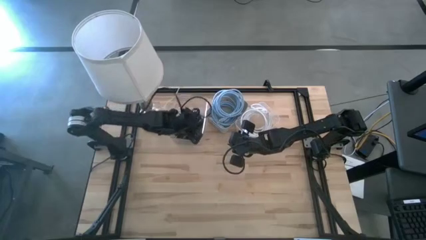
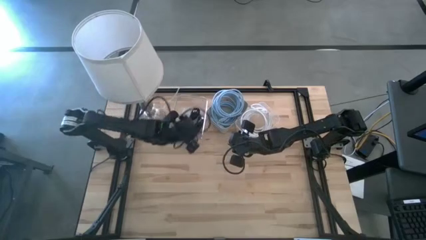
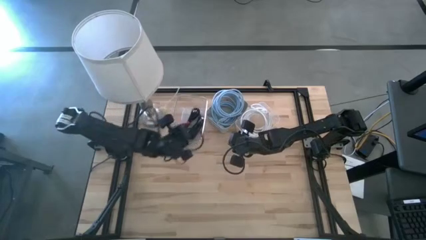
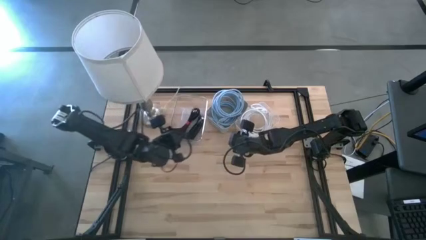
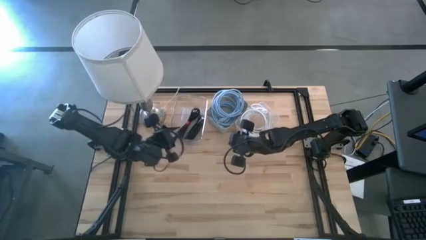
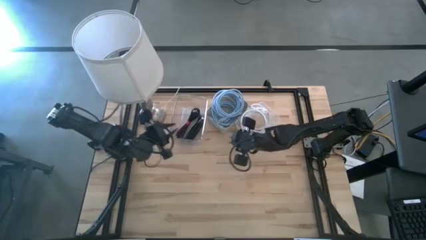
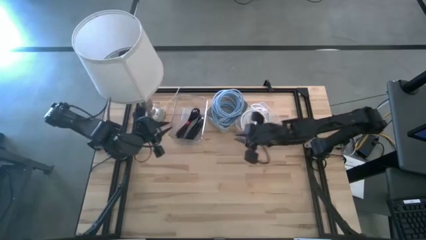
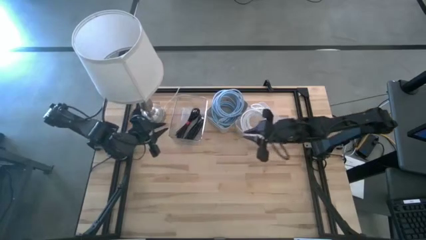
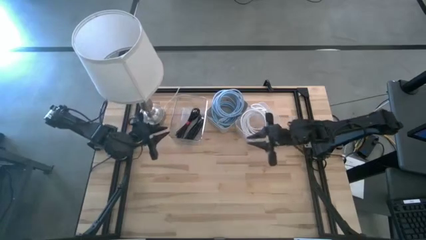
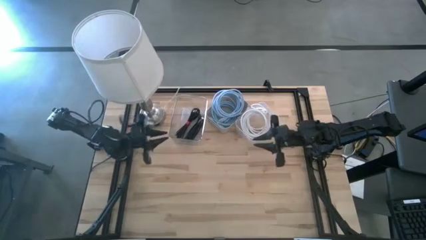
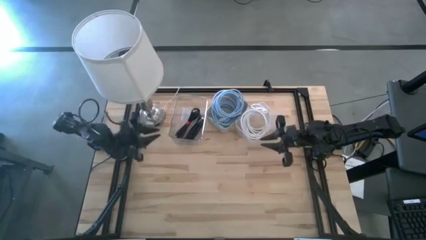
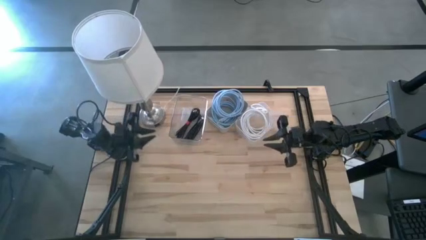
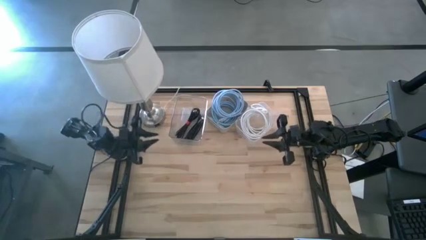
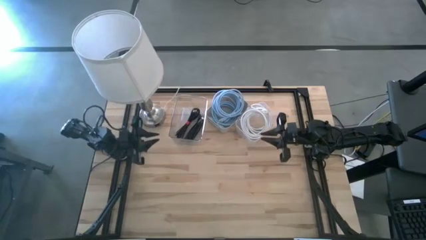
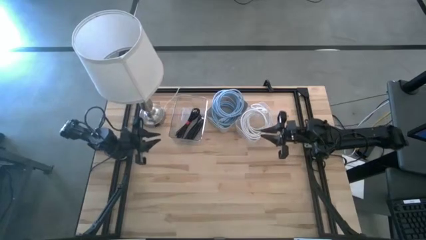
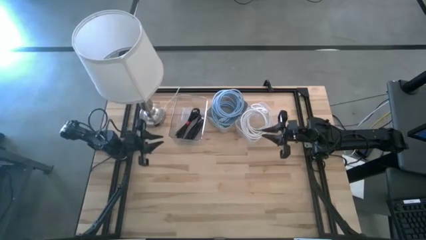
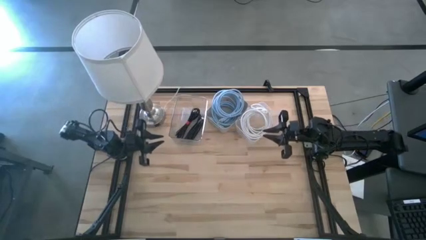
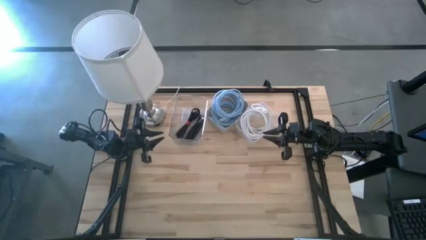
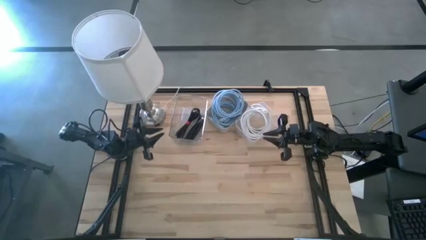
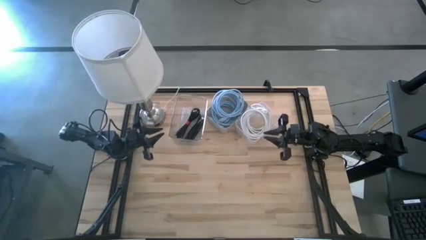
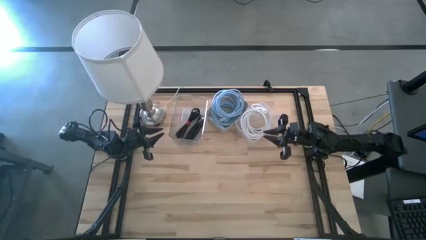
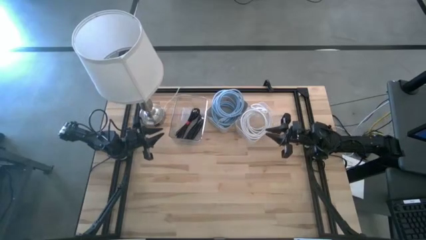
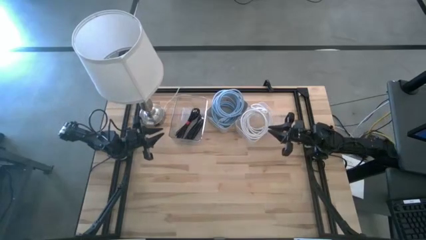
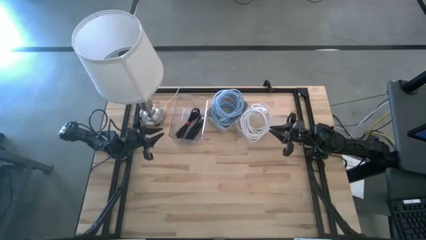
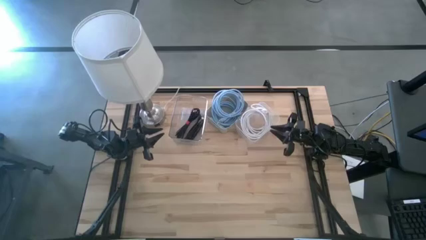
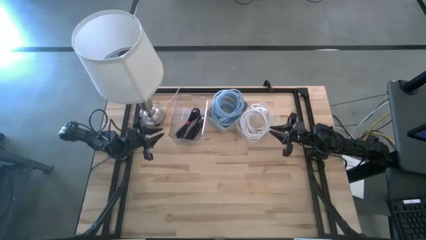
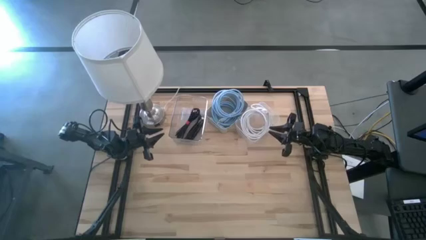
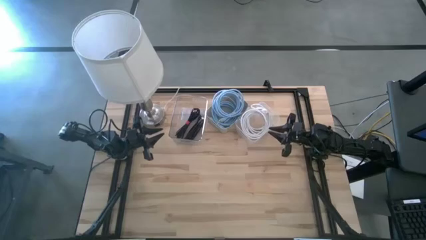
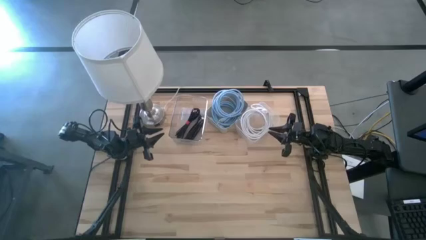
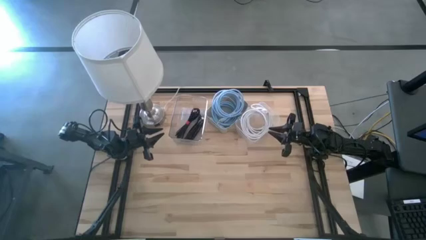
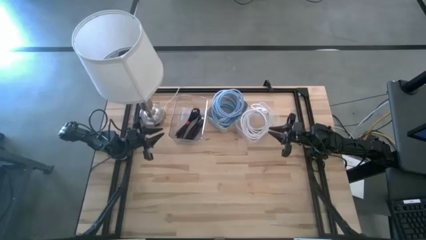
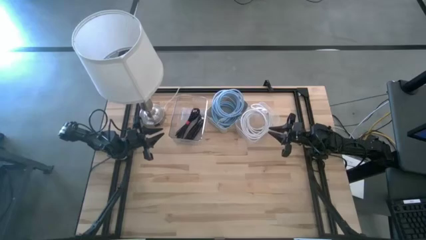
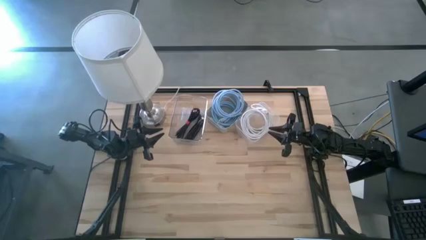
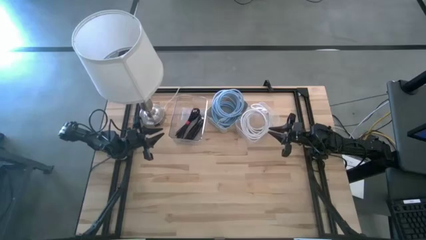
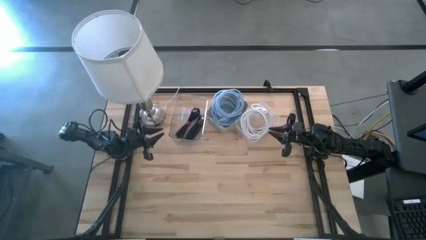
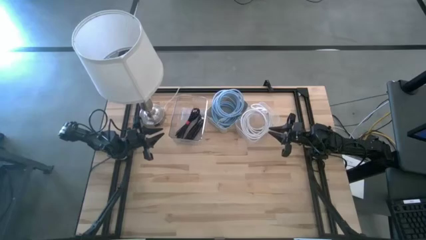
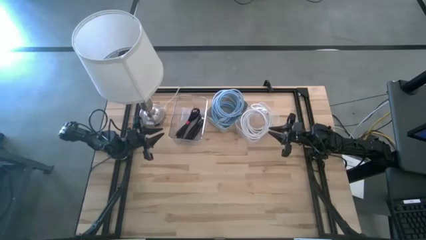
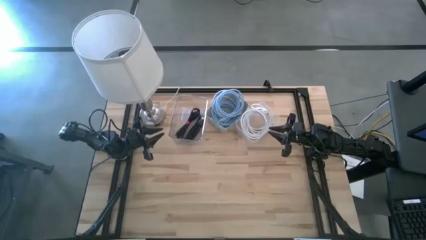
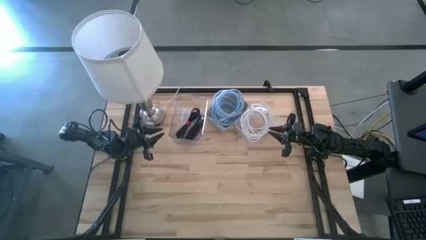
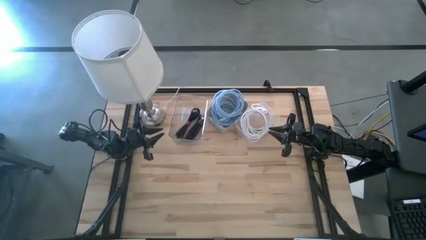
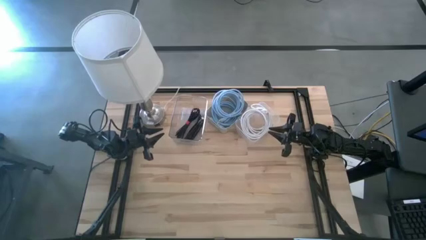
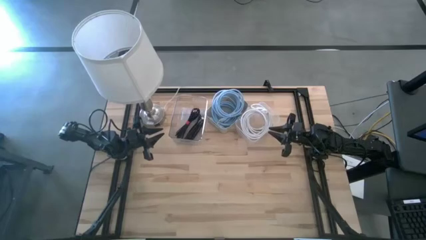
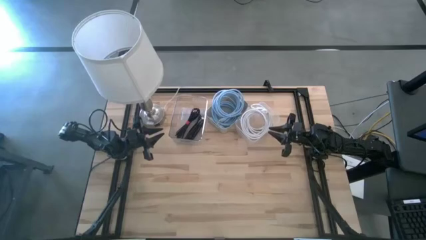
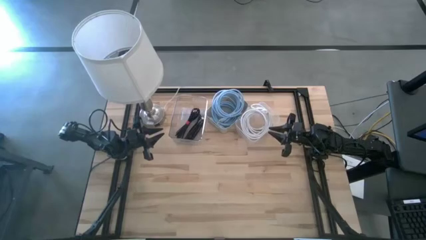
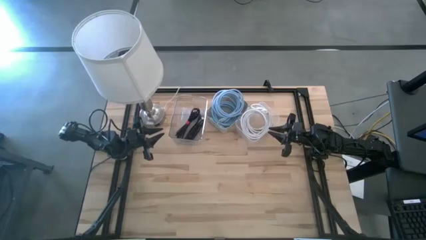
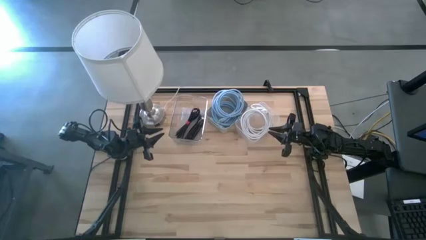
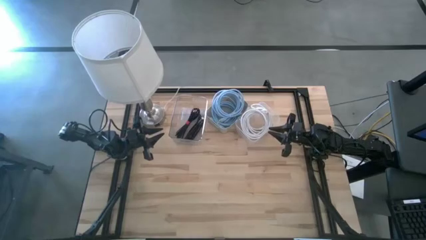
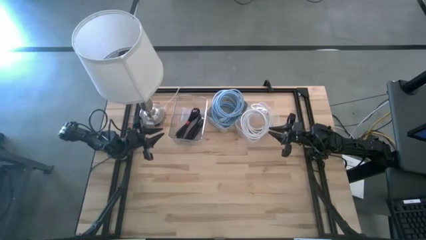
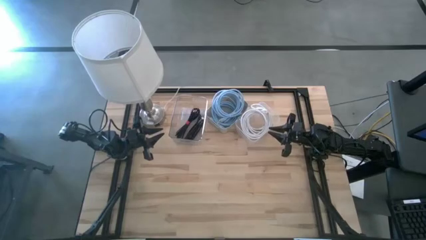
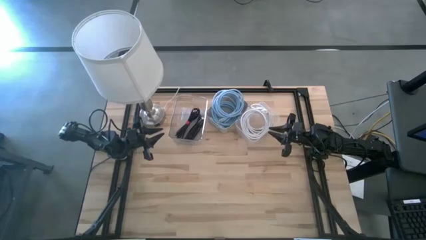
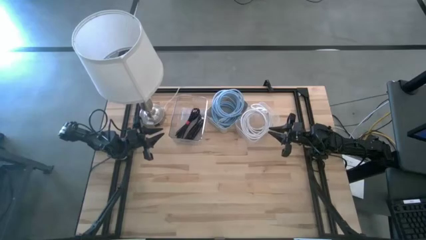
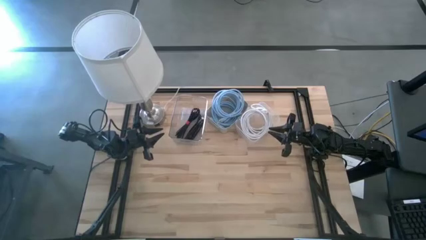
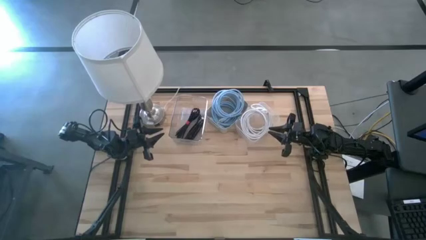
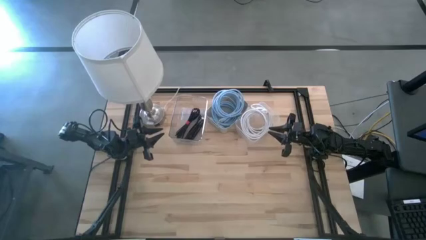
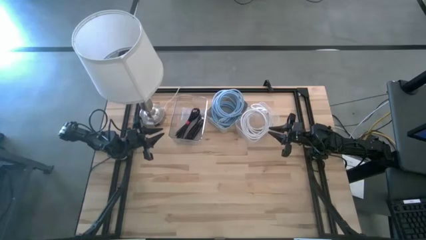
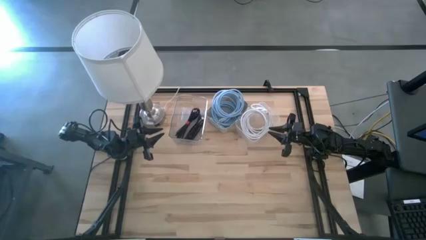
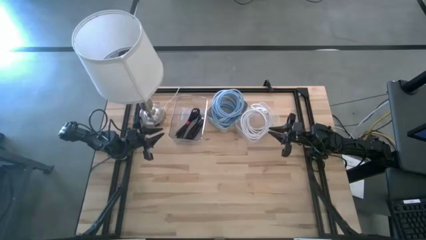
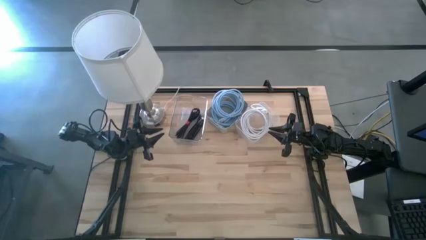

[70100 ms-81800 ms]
Task: Sort HDMI cables
Return to Home Position

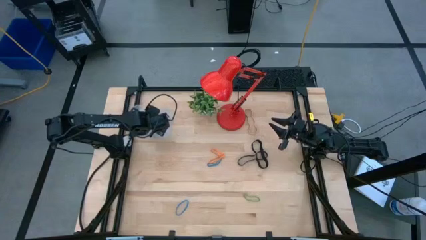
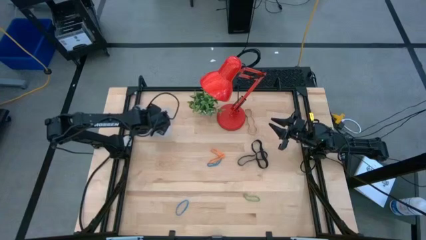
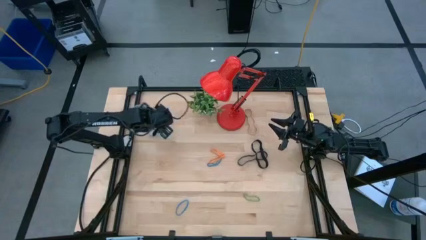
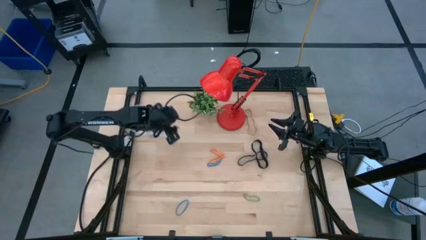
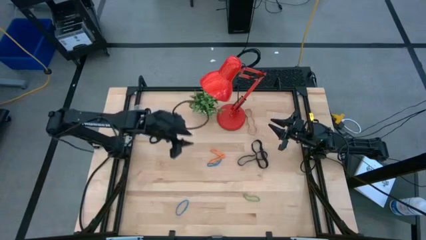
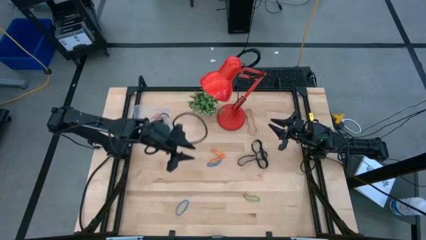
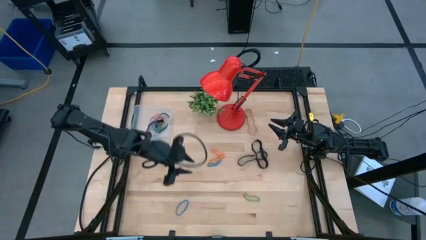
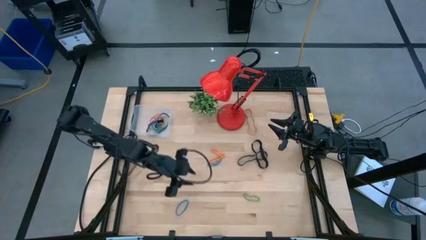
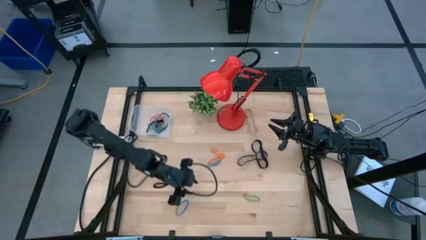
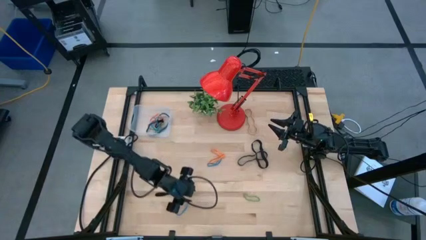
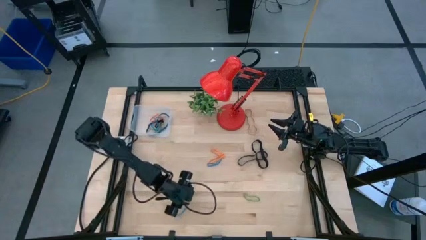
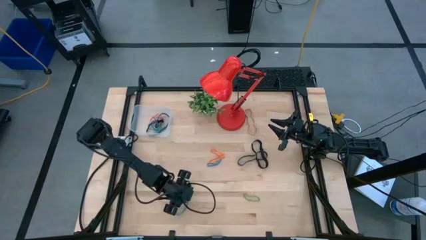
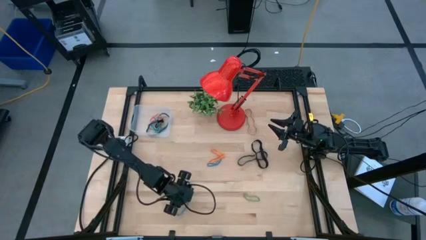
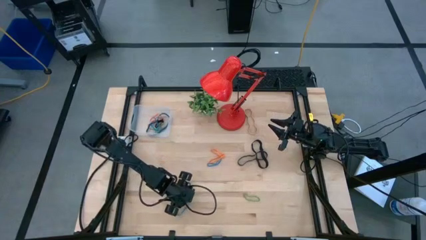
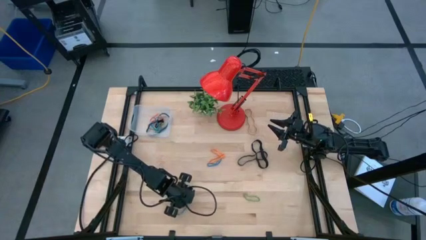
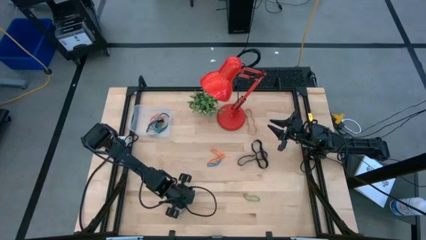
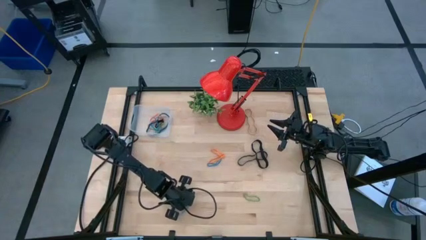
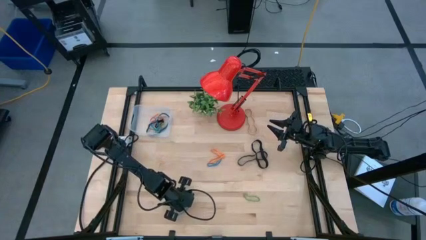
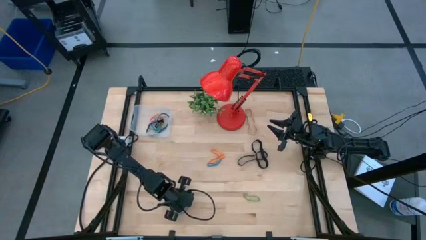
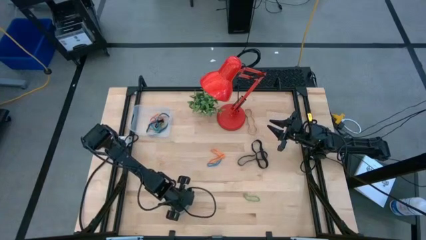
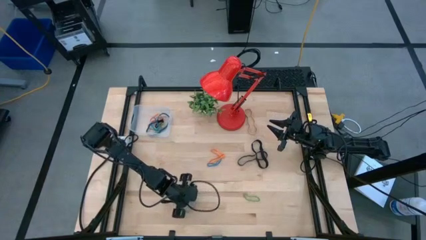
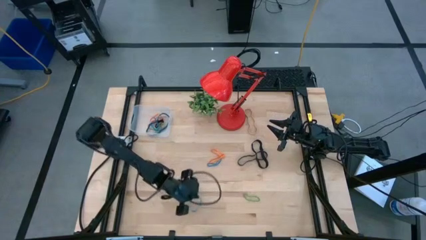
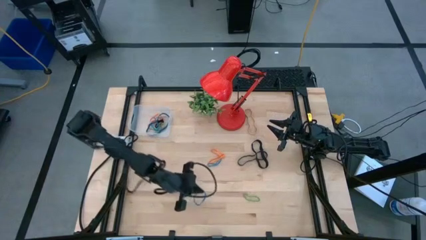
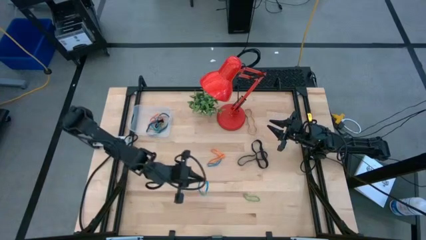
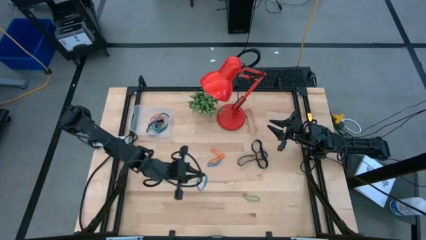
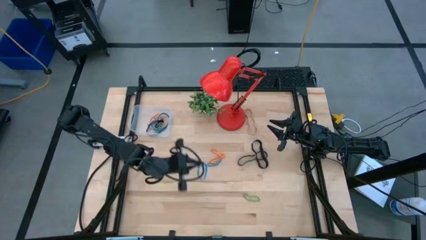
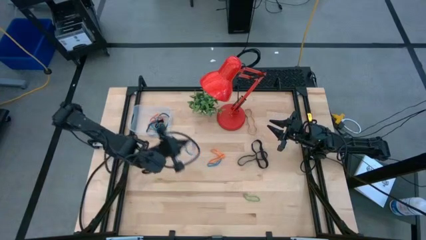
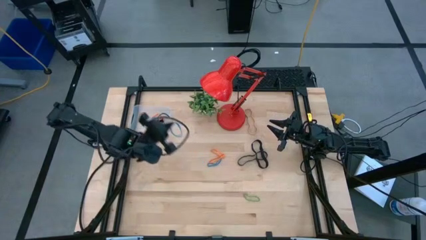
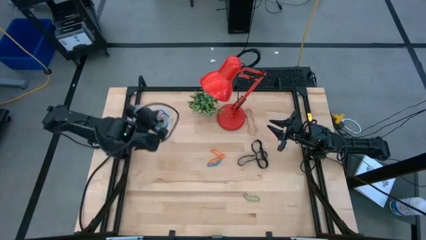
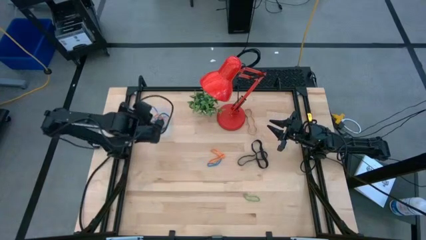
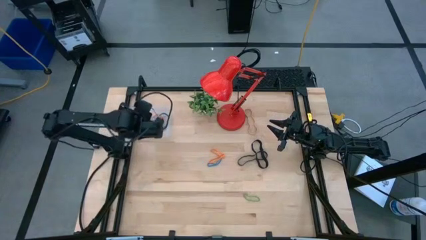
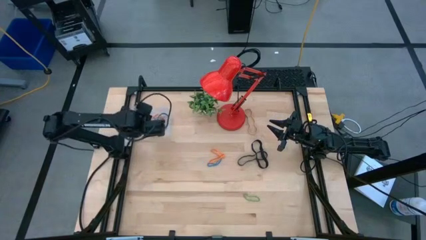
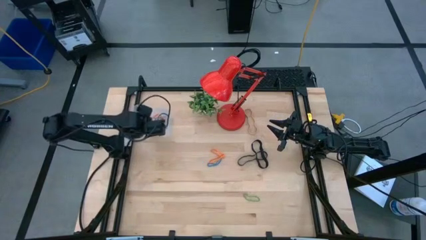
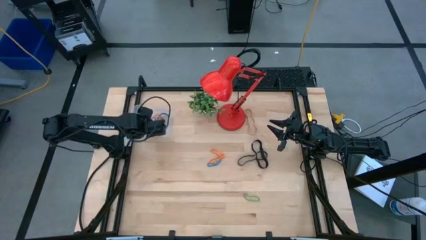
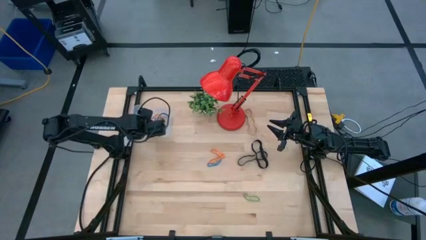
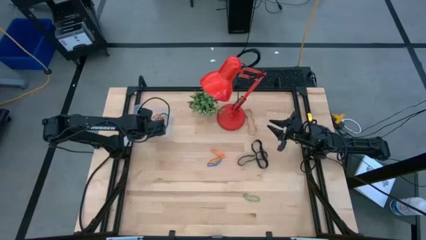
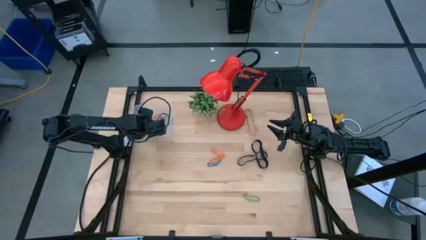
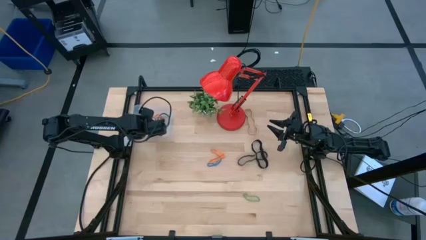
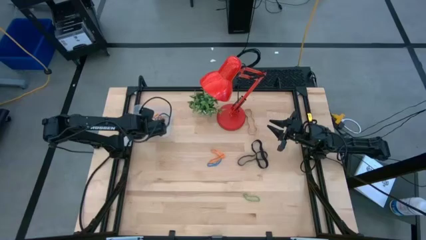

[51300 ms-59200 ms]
Task: Pick and place rubber bands into bin
Put the blue rubber band into the transparent bin
